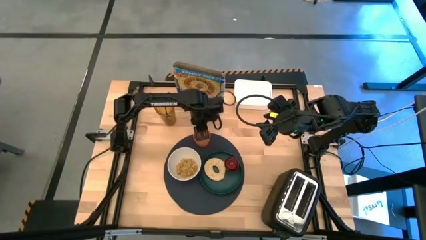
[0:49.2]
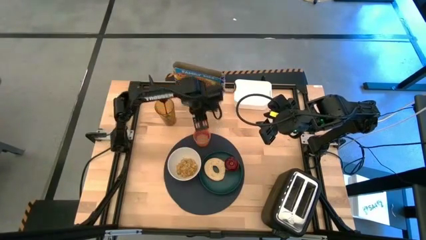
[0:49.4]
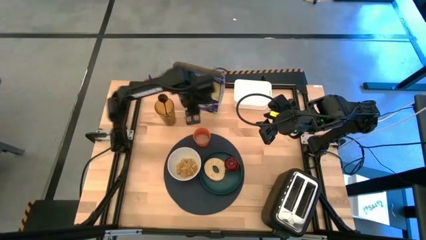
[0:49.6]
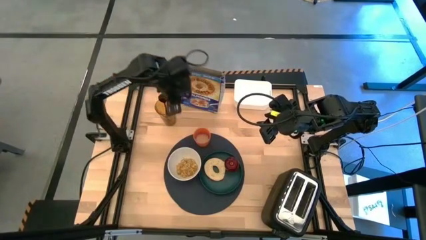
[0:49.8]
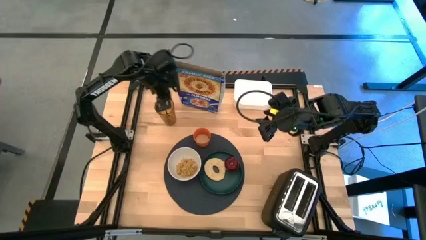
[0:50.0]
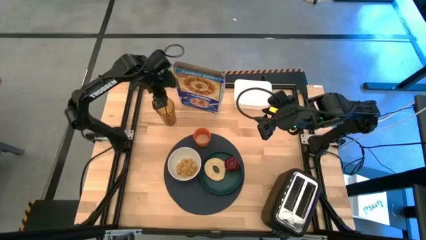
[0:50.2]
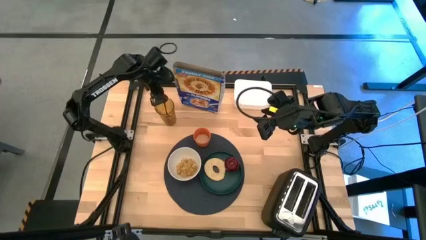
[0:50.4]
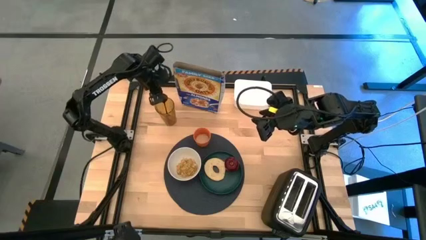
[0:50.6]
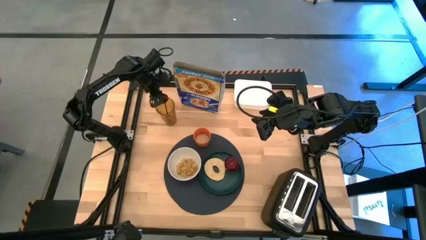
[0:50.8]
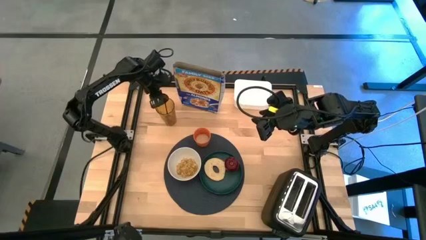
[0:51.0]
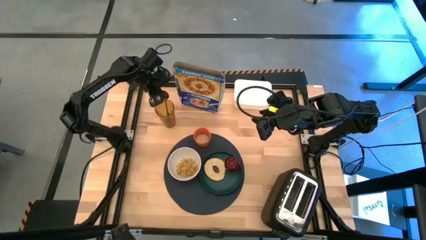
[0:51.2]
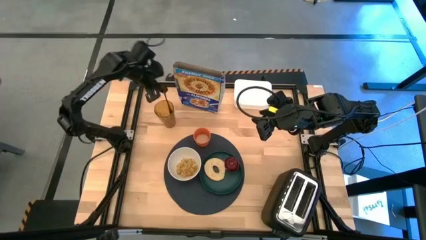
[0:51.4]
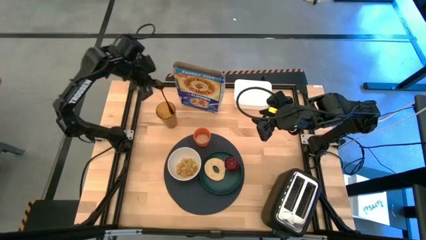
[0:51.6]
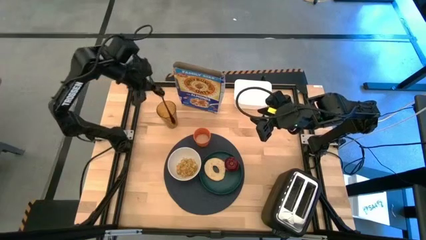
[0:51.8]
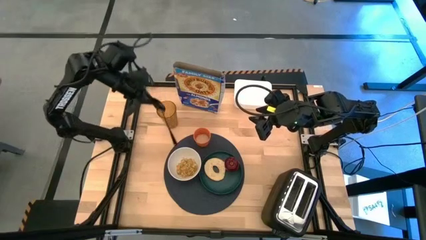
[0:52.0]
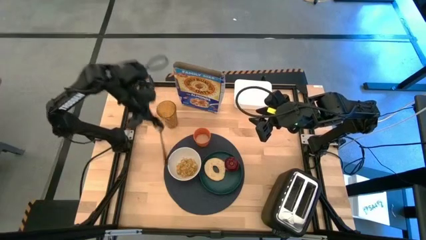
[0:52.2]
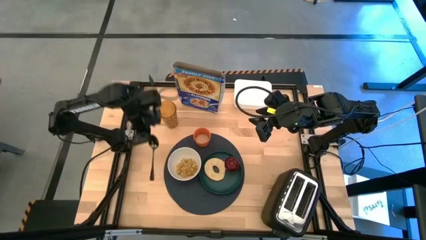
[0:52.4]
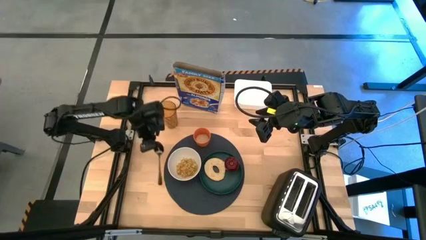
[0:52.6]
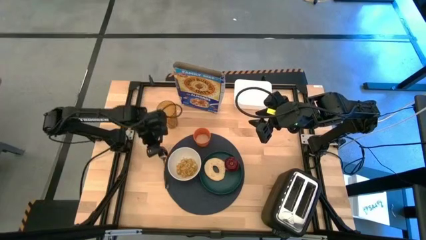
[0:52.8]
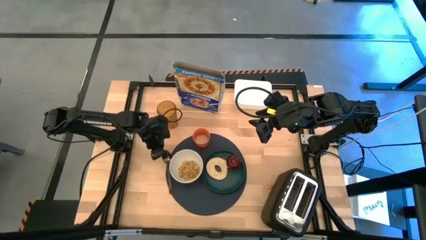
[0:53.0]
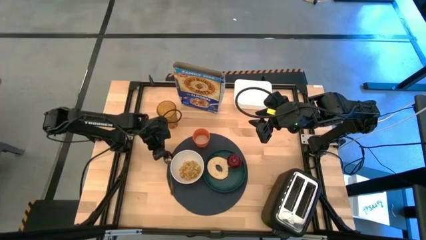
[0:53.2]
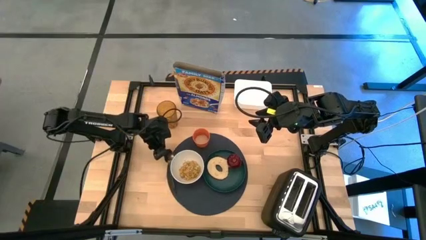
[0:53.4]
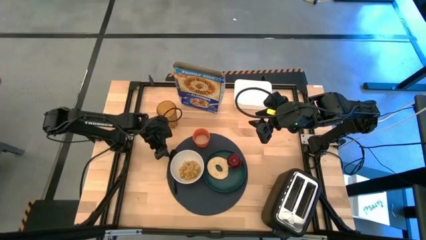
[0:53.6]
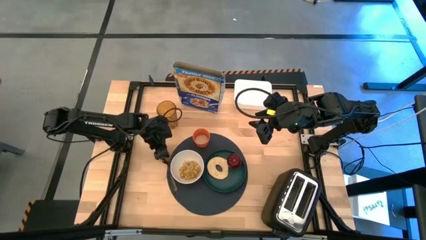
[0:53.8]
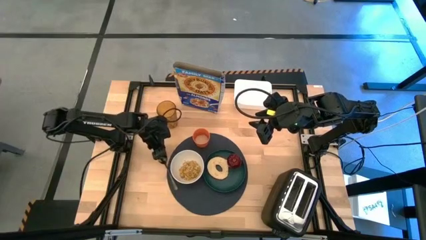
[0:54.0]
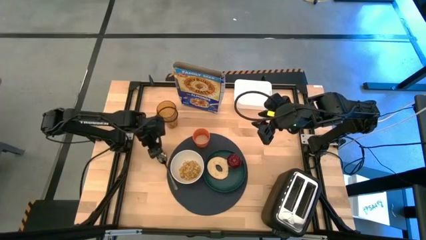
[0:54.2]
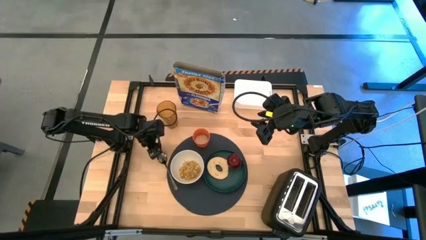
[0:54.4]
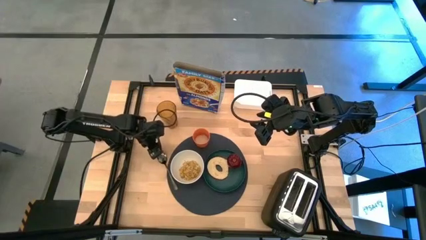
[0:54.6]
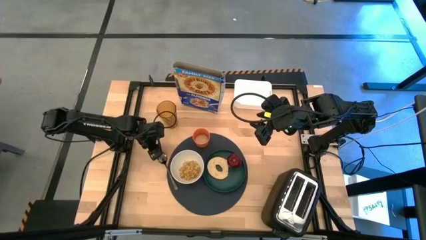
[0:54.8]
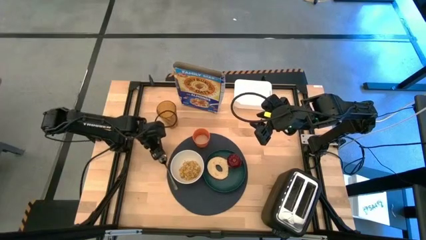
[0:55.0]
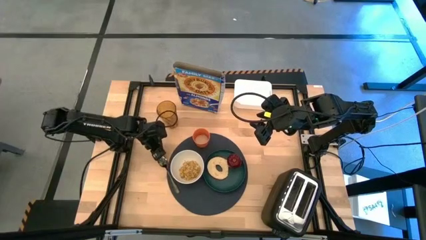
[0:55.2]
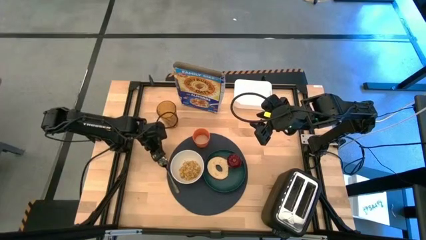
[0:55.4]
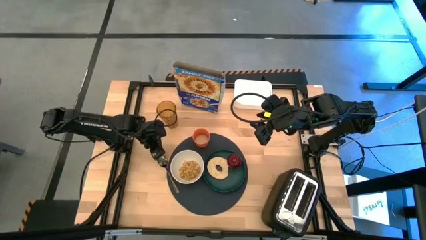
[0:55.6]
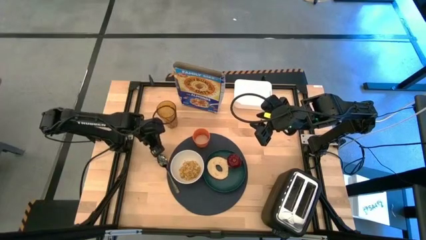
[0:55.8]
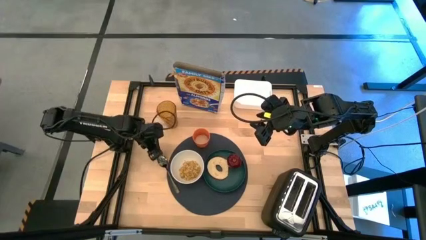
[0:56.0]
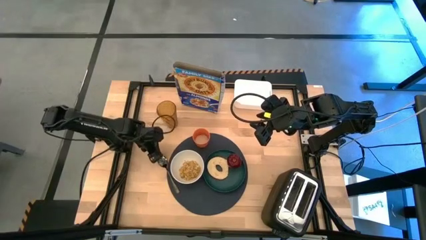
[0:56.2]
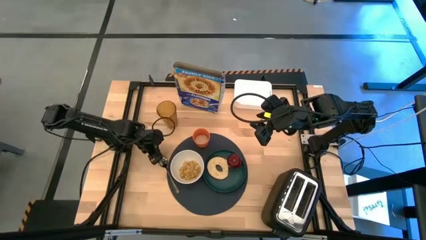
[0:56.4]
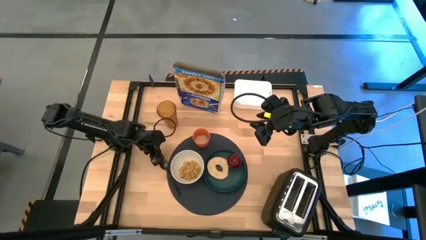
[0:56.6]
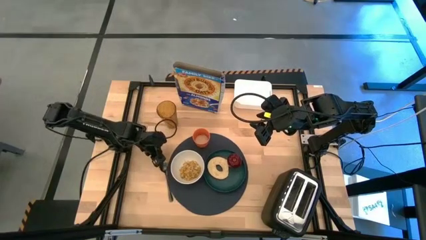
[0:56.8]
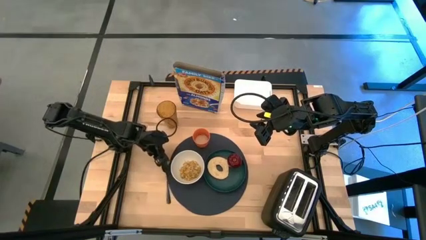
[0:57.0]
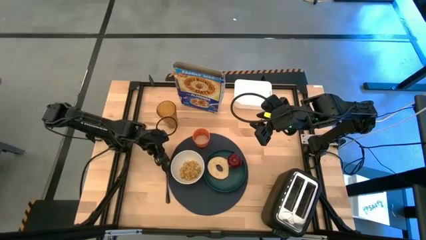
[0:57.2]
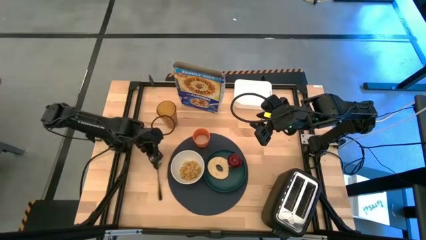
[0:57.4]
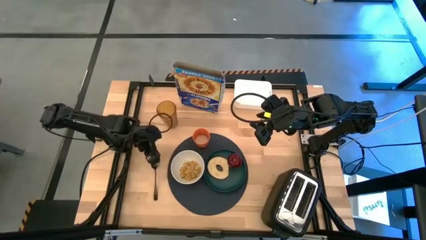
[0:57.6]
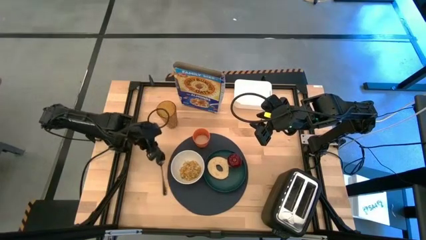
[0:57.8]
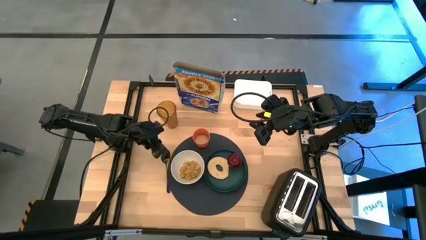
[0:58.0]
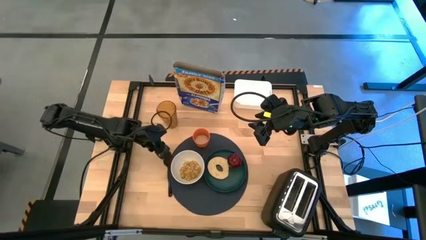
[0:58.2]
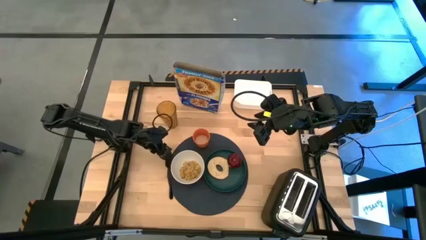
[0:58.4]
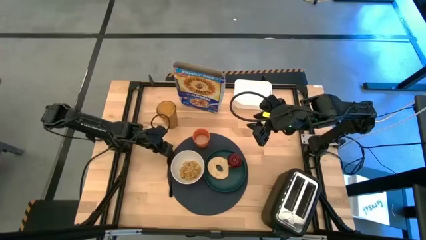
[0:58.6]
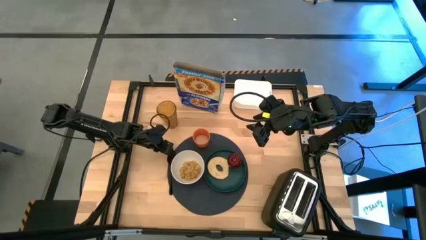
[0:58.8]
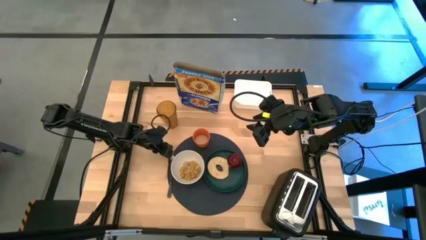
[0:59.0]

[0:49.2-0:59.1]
Task: Arrange a breakfast setting
Put the black spoon on the left side of the blue table mat

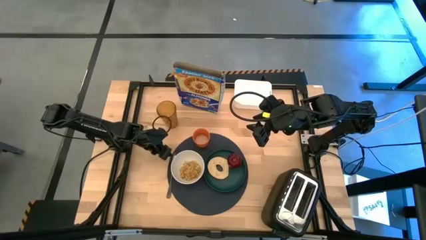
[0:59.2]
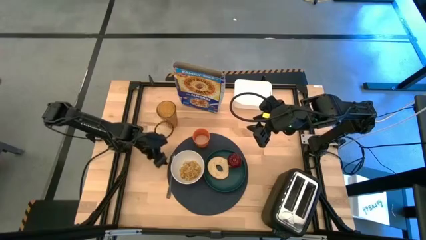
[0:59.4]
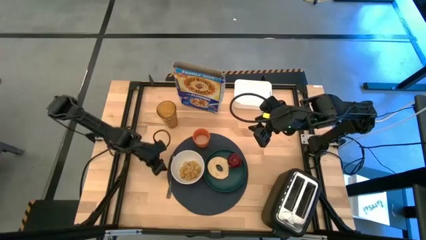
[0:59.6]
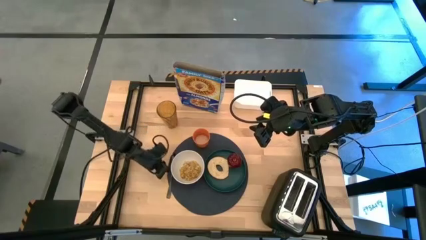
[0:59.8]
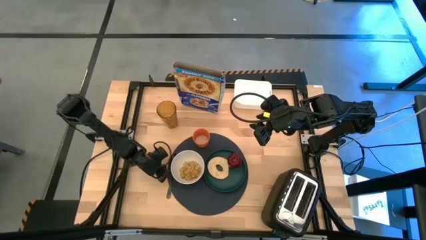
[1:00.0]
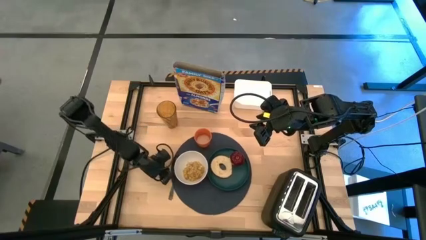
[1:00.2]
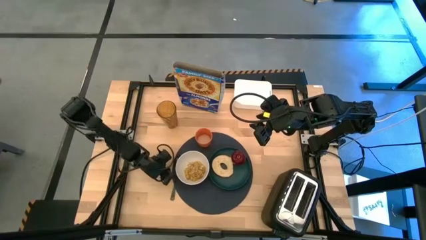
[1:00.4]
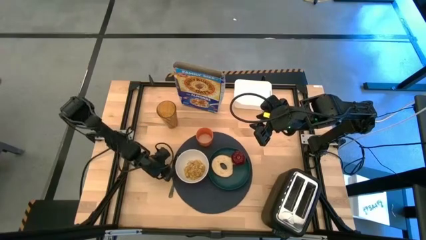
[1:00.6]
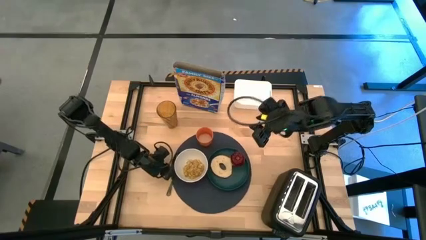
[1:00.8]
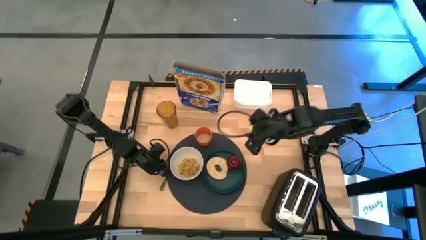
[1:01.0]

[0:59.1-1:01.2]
Adjust the blue table mat

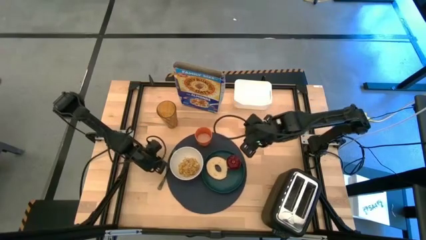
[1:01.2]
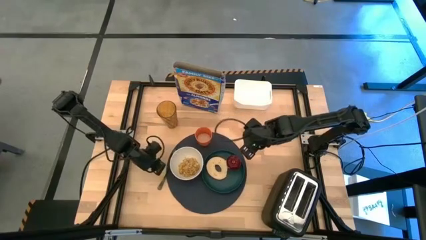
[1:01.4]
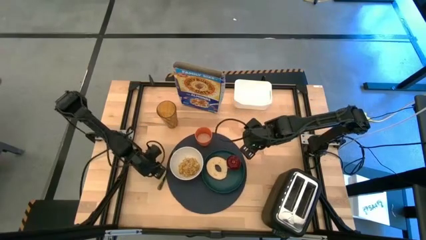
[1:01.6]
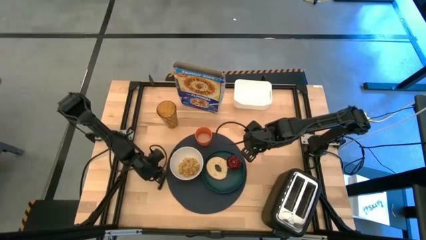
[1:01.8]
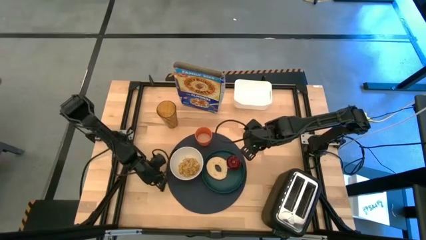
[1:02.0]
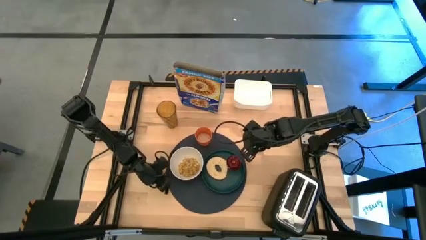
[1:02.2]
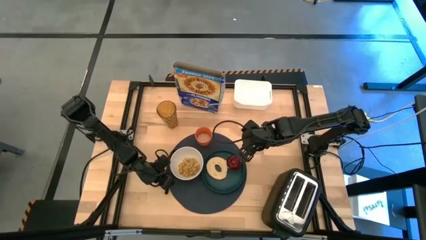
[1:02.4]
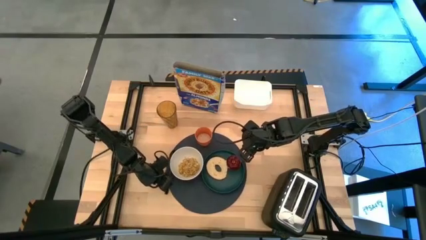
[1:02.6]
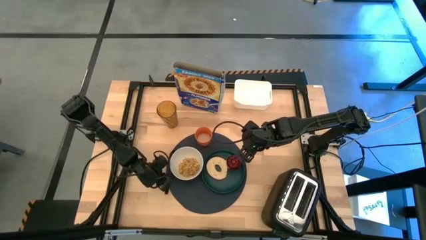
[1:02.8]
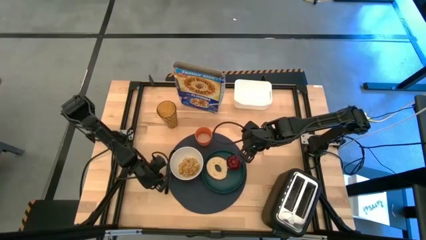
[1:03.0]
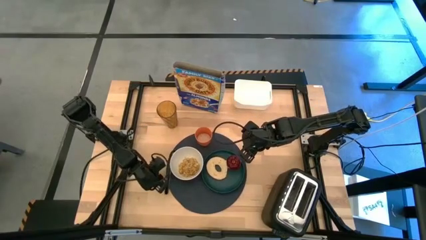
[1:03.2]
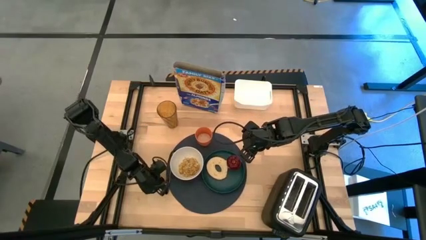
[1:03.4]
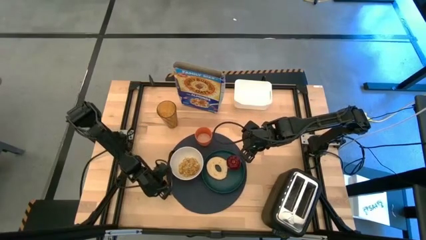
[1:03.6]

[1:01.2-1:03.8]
Adjust the spoon on the mat

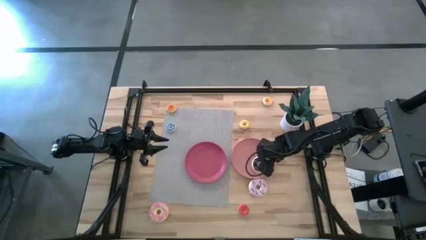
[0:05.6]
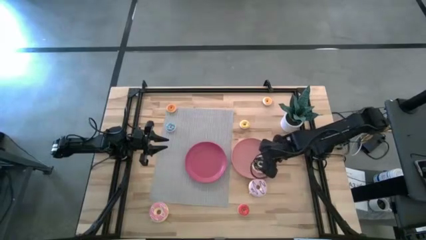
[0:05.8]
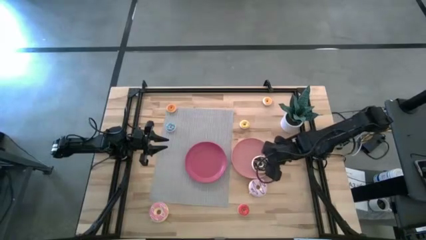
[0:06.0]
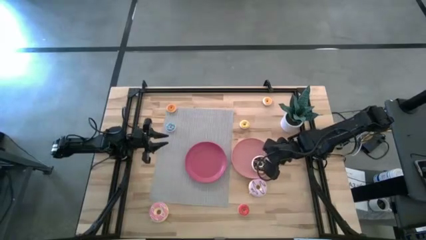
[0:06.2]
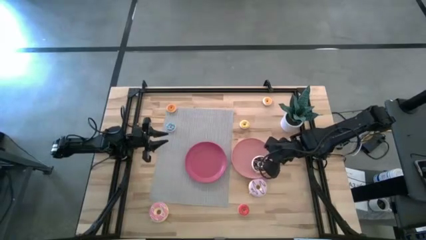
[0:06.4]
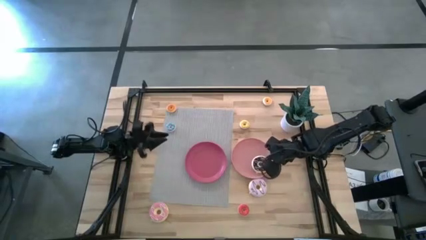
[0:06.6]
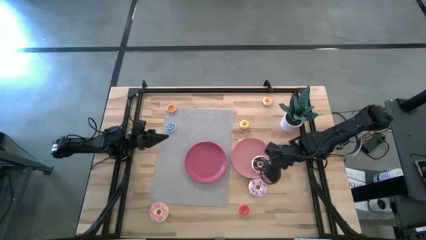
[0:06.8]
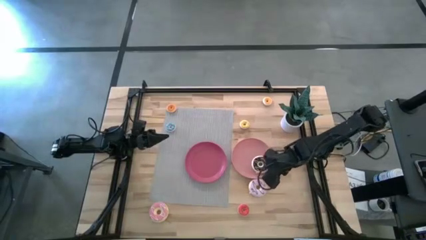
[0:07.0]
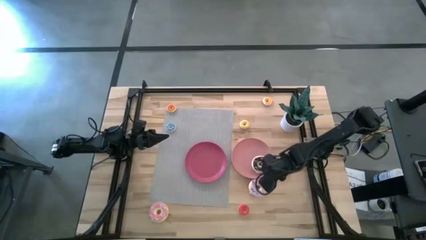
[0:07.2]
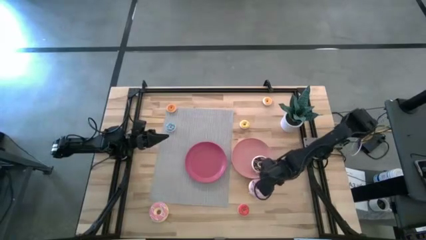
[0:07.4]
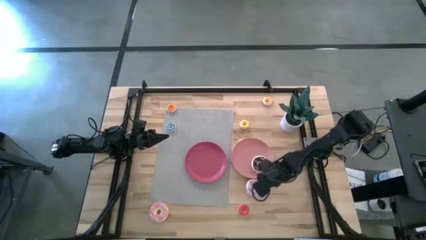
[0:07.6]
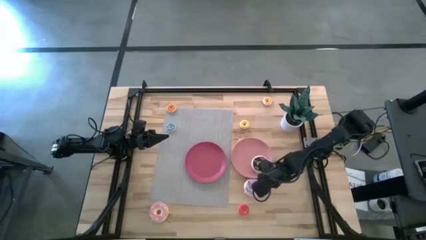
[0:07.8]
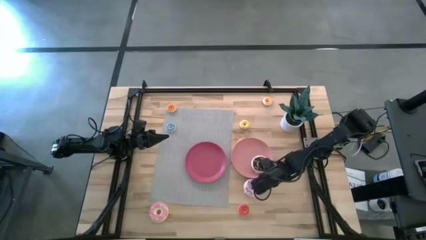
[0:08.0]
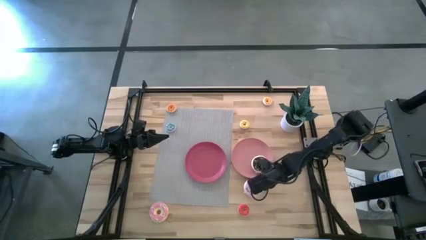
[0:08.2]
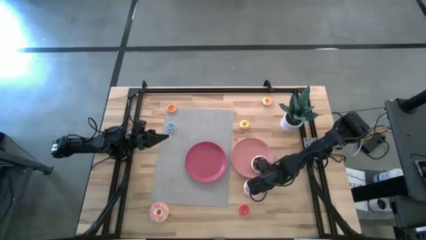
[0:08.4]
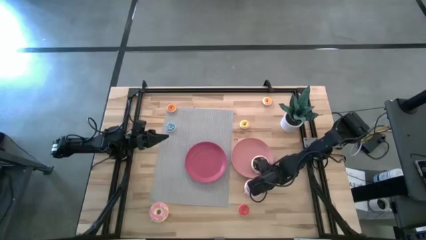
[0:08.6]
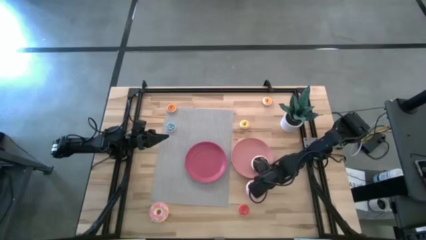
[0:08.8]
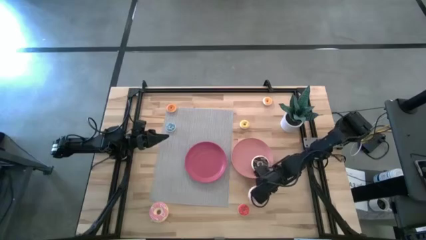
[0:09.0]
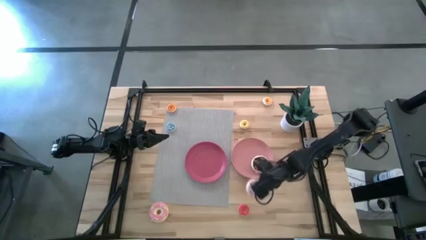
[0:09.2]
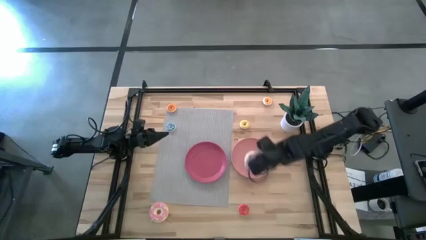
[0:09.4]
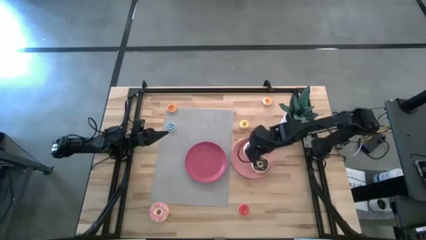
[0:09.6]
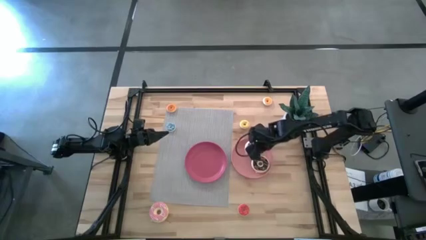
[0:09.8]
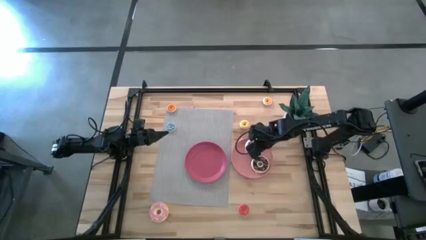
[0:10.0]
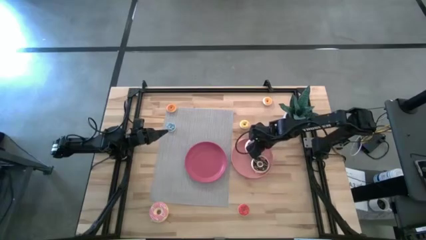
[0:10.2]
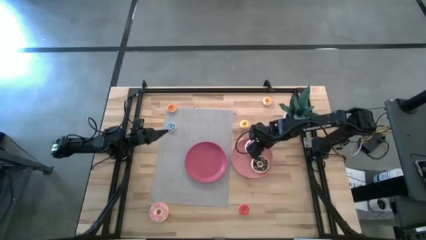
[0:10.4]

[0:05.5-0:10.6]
Task: Pick & Place donuts
Put the large purple donut on the pink plate
